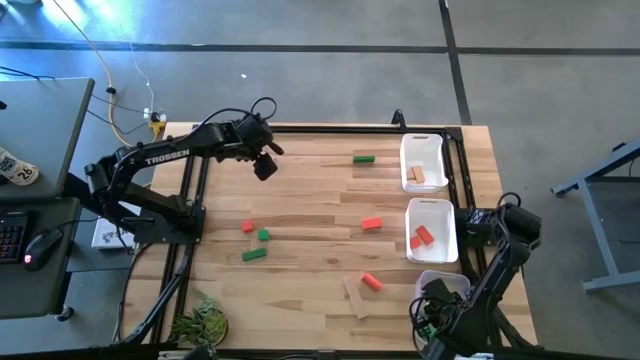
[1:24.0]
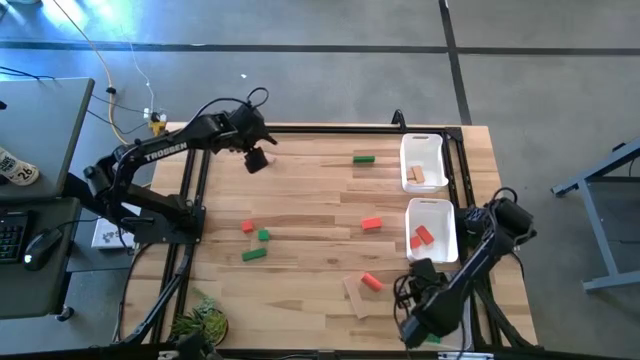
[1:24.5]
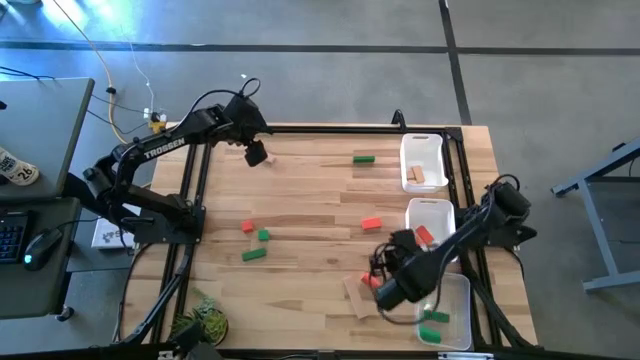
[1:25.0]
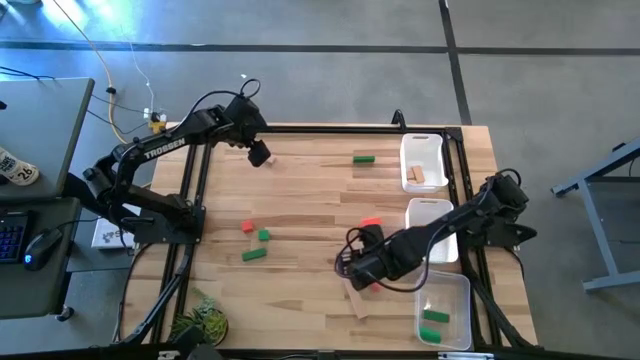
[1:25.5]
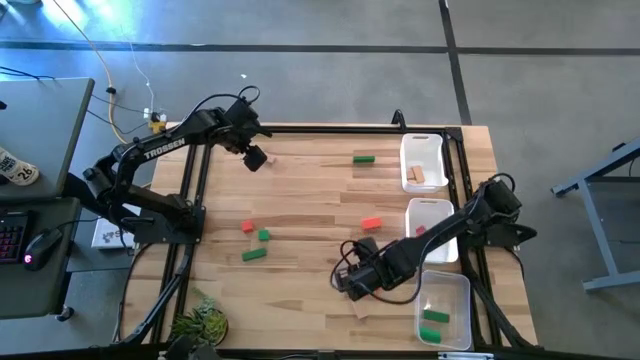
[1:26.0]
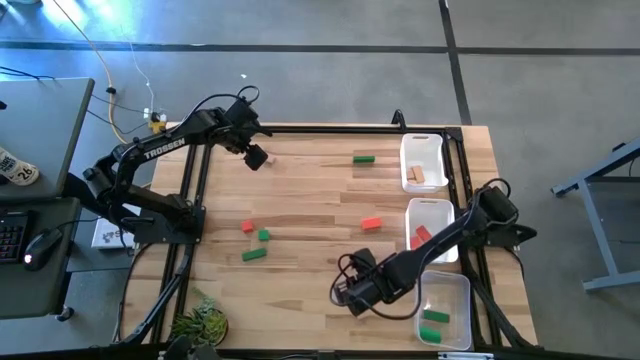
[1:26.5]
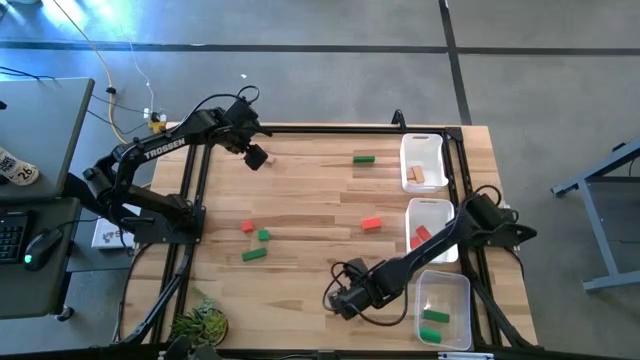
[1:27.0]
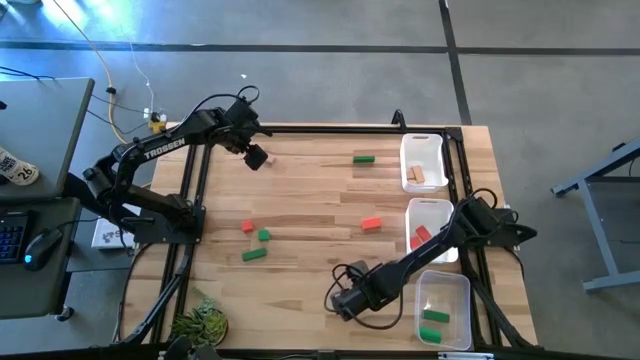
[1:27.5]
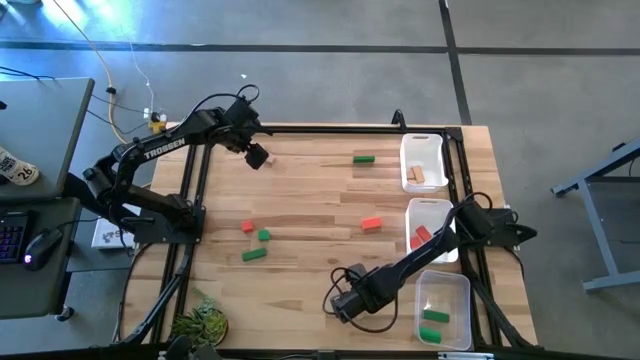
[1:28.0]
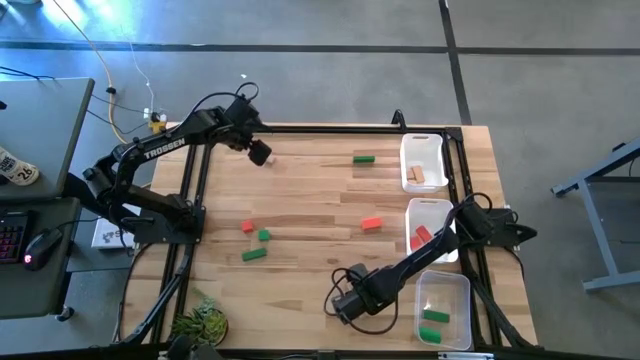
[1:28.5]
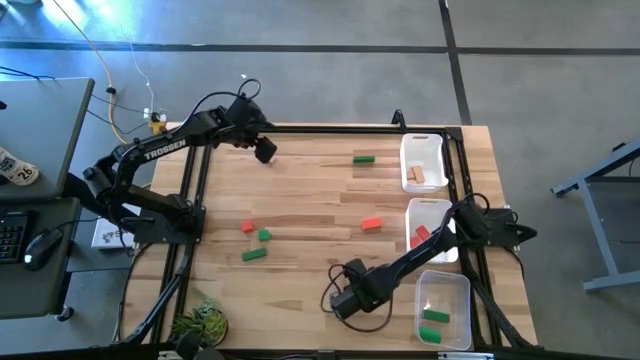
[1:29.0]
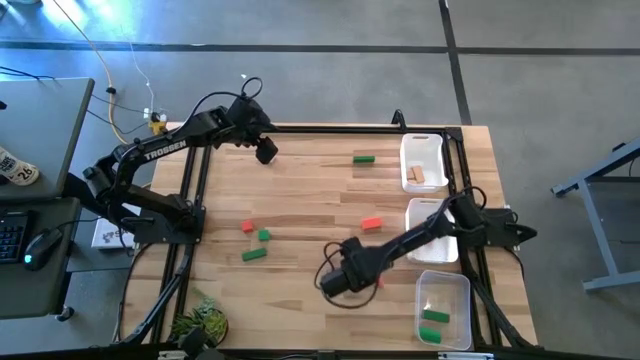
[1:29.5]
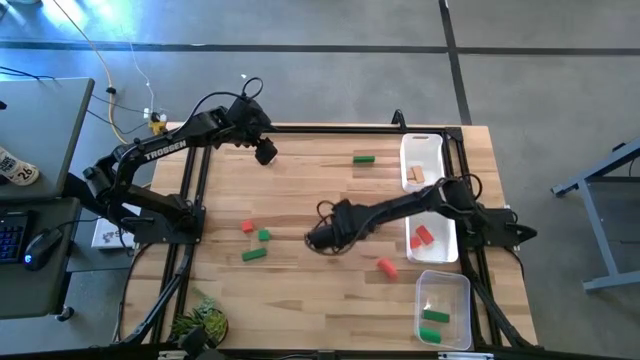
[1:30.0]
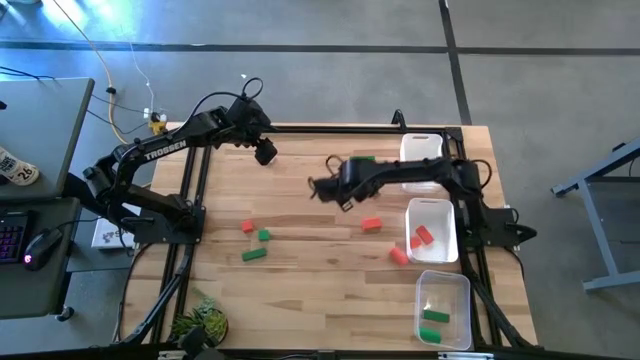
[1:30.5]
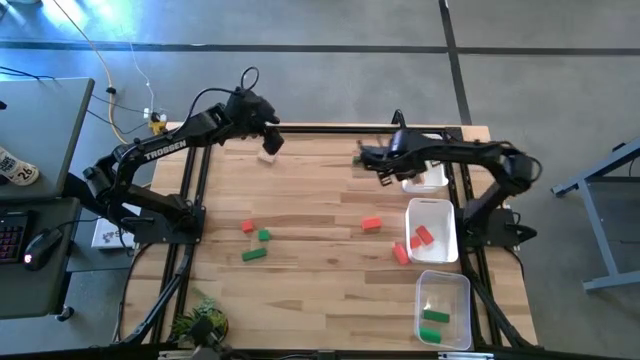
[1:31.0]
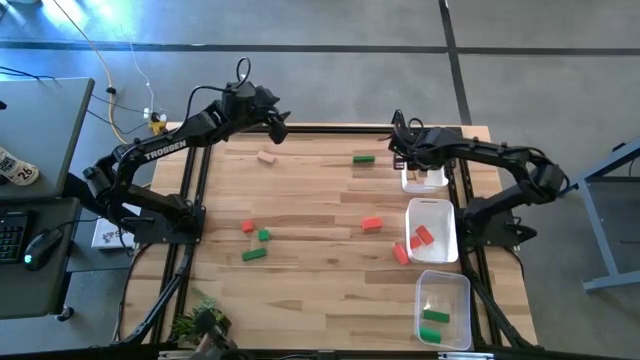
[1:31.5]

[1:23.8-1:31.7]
Task: Sort & place blocks by color
Put the brown block into the top white bin

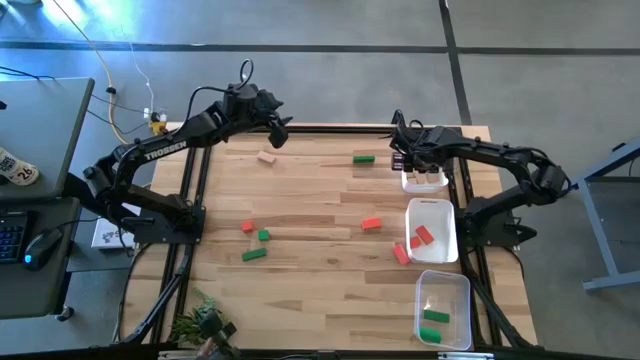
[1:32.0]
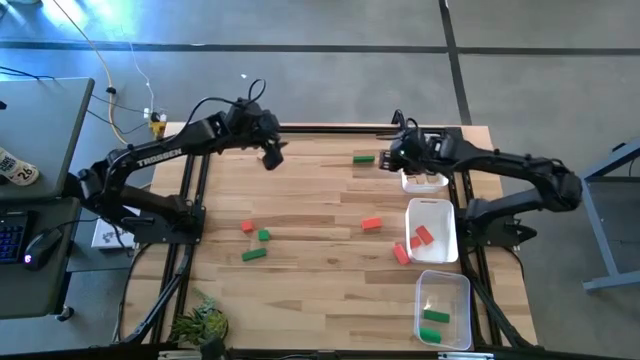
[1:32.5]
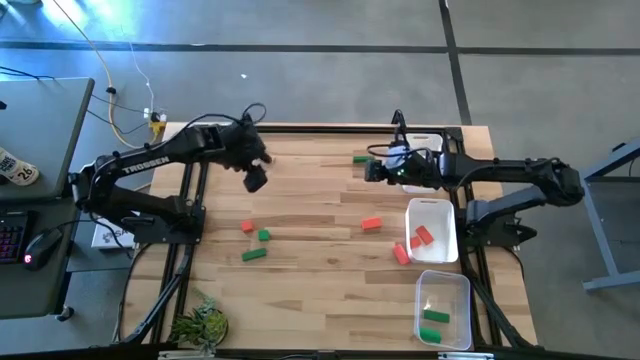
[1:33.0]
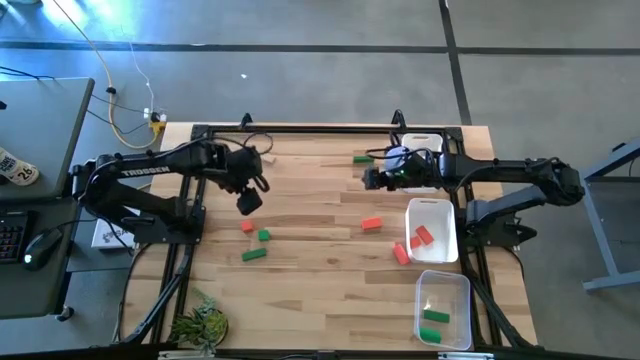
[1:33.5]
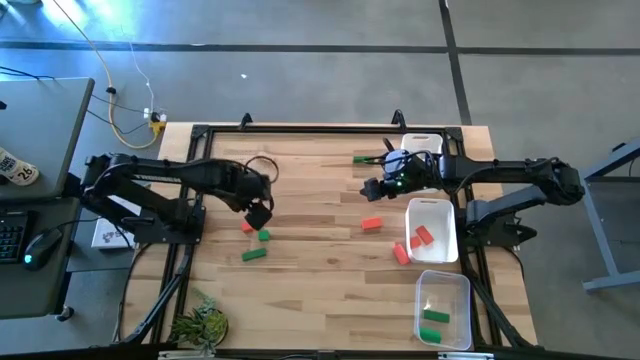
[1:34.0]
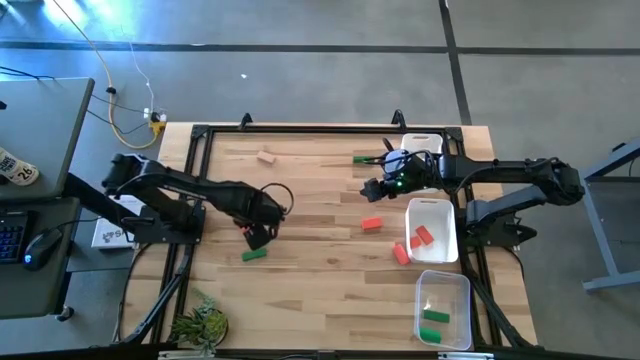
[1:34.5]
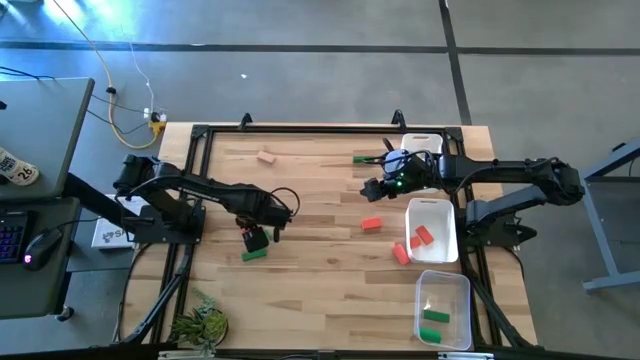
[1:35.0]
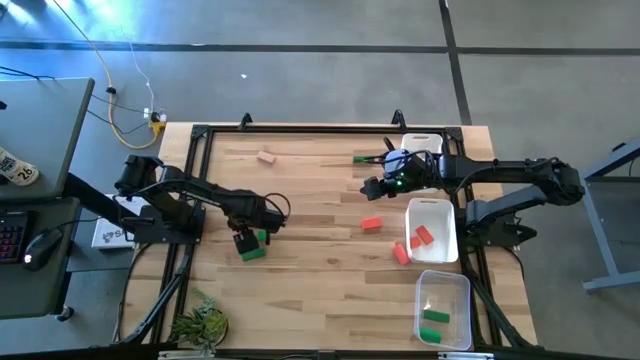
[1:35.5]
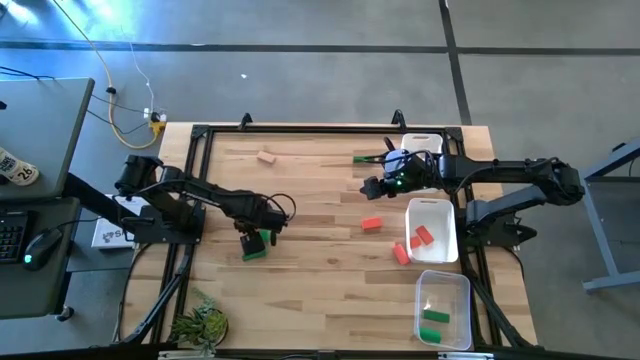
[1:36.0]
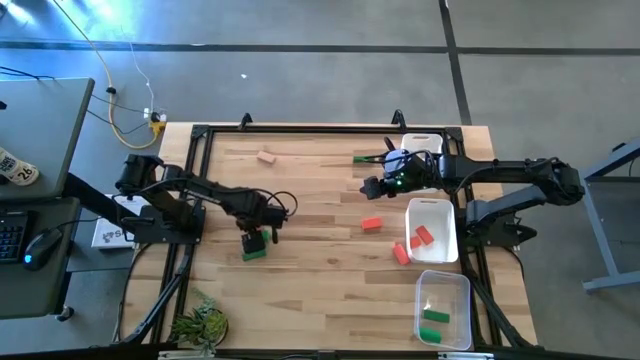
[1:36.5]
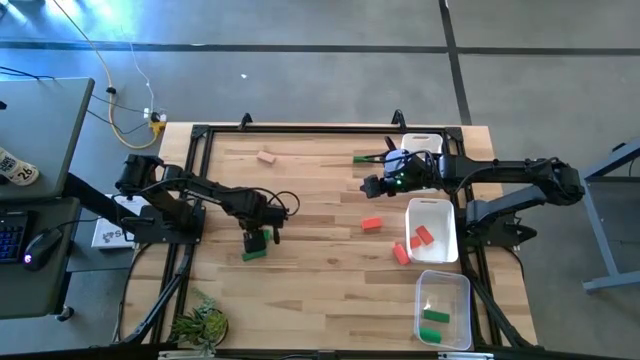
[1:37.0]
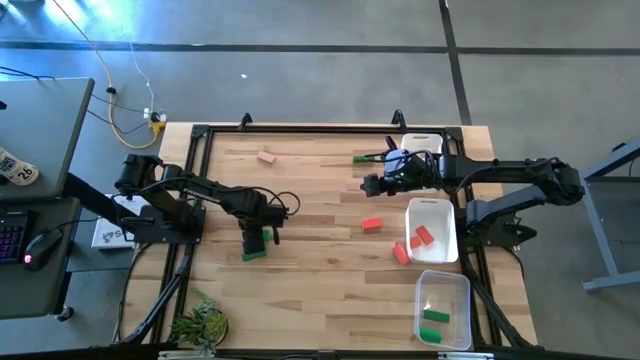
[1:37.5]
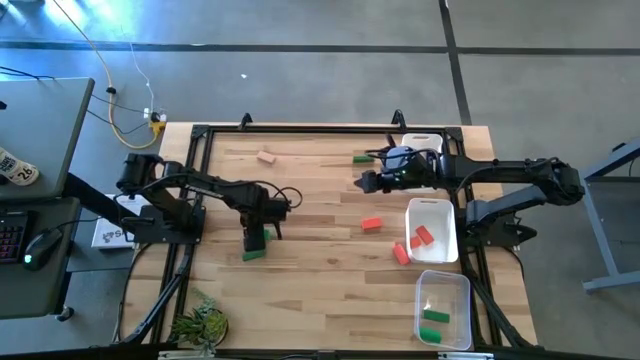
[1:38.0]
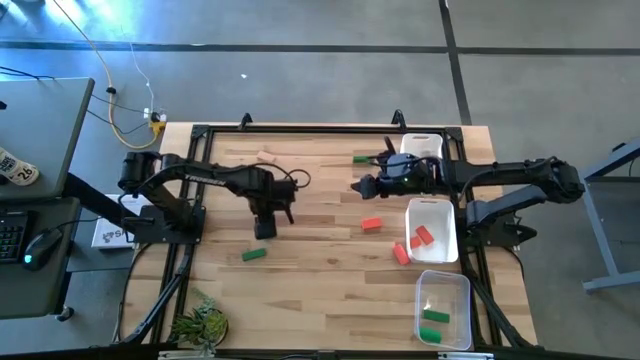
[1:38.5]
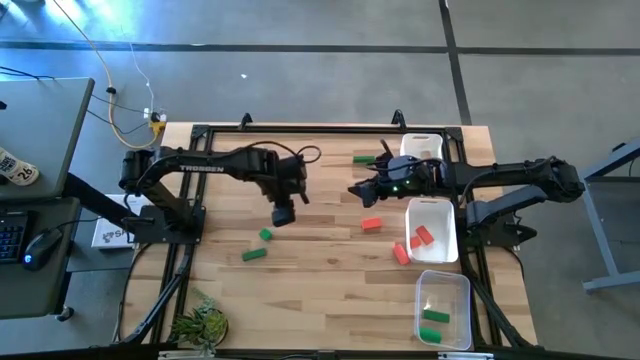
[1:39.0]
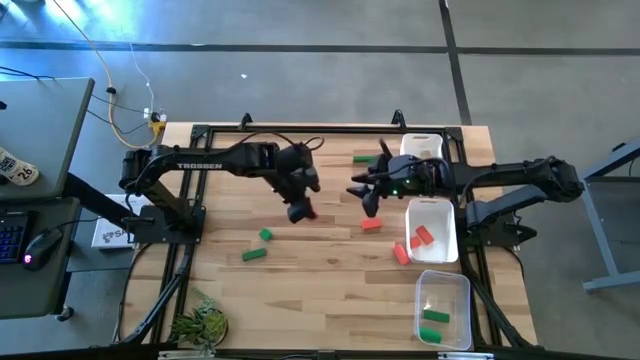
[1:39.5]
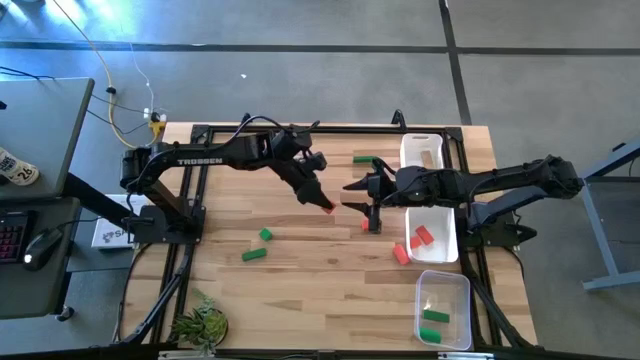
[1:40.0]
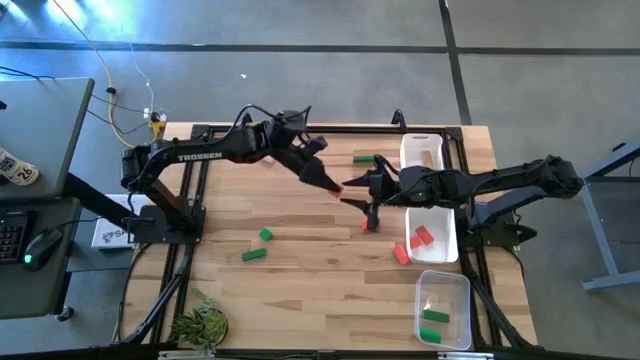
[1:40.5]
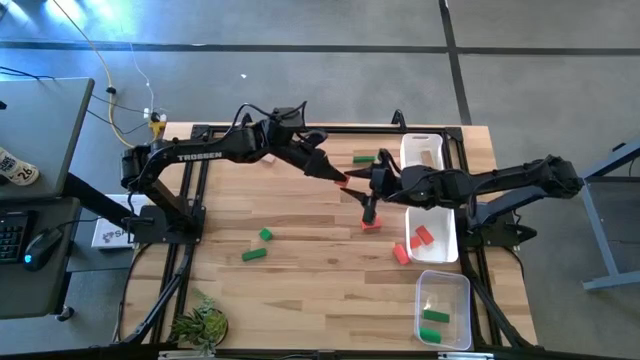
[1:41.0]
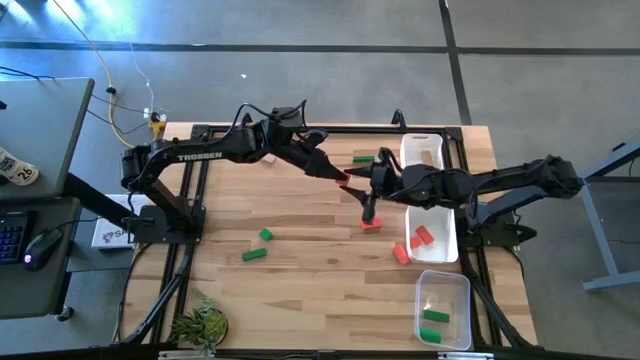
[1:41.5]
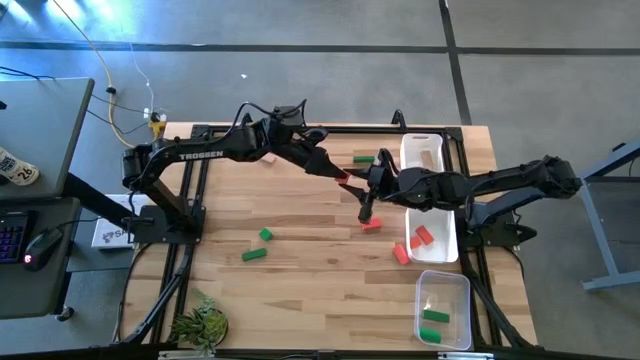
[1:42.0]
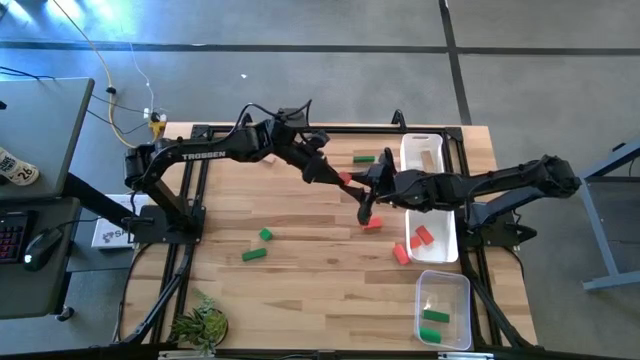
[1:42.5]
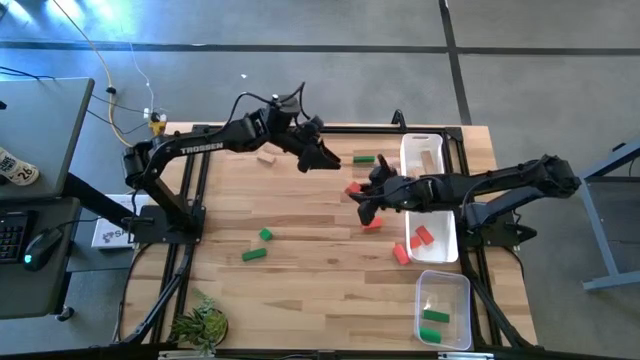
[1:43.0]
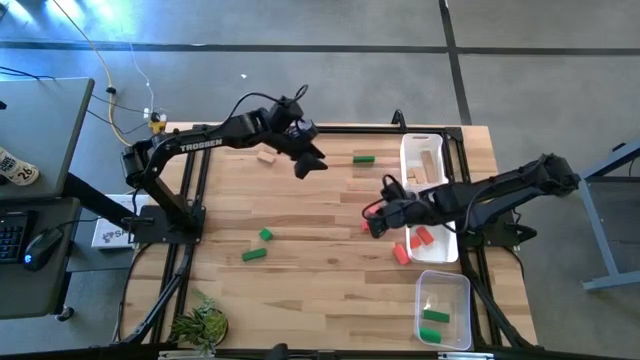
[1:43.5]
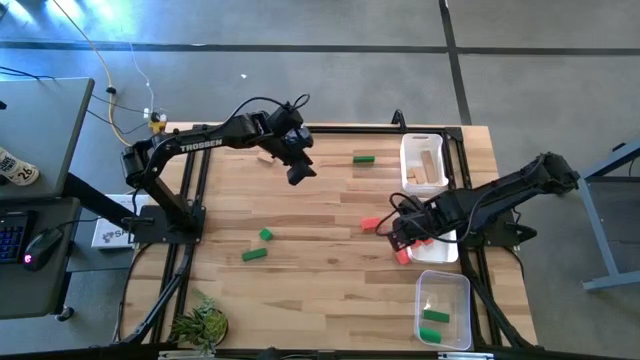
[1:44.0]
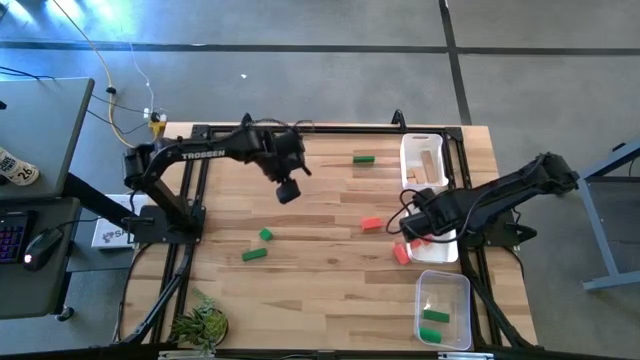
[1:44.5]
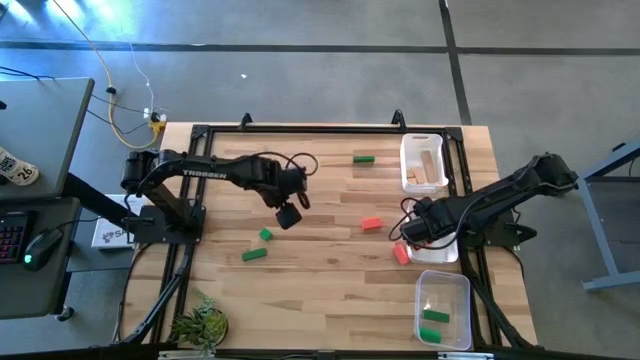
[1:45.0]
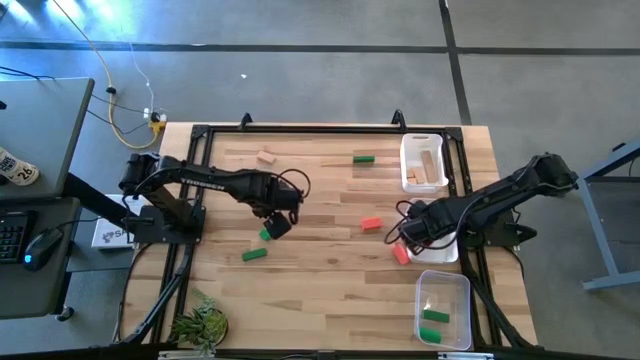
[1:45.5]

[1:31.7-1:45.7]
Put the orange block into the bottom white bin
